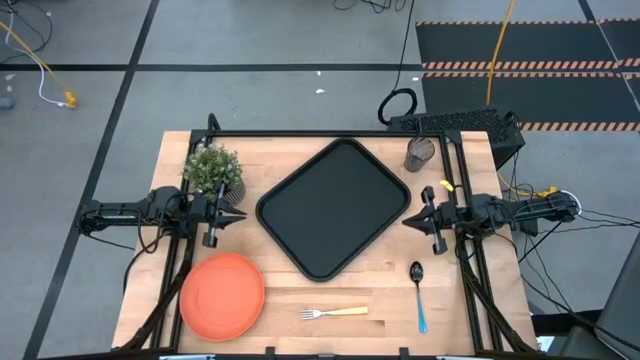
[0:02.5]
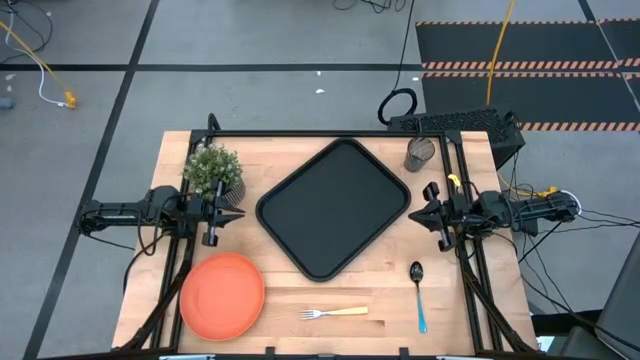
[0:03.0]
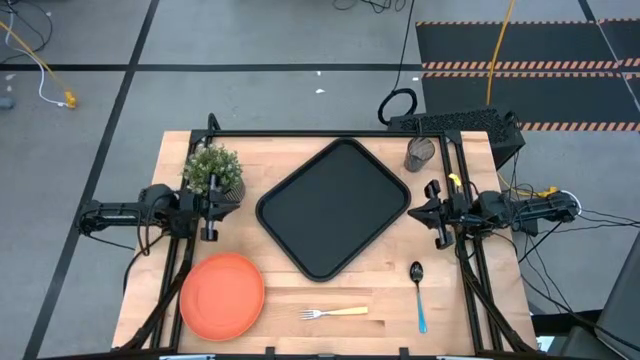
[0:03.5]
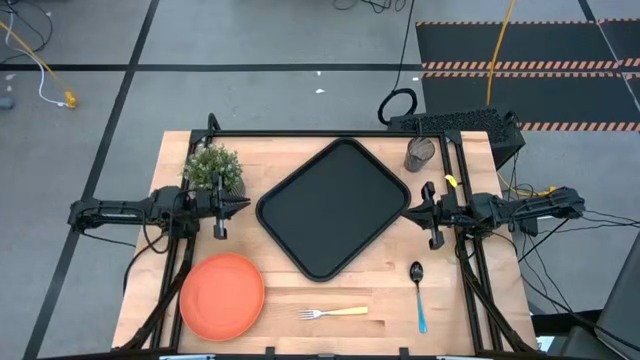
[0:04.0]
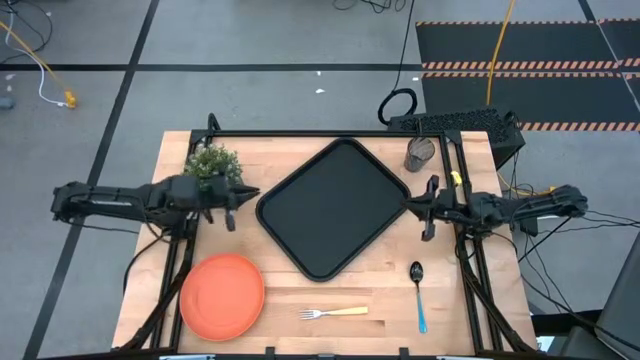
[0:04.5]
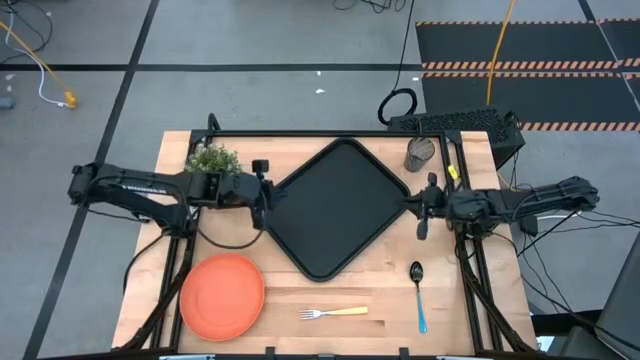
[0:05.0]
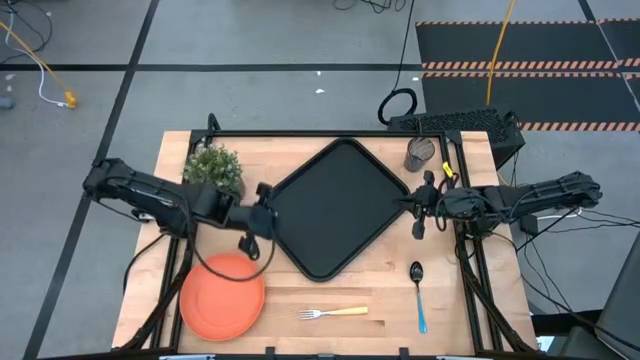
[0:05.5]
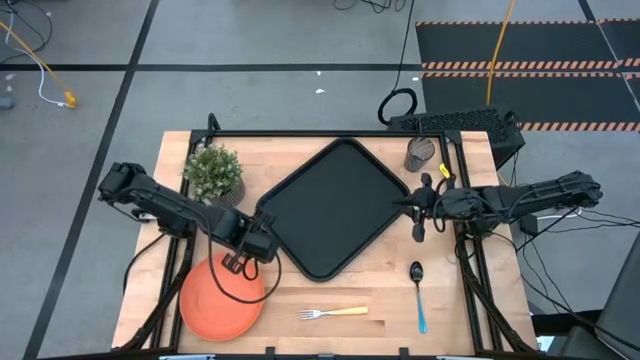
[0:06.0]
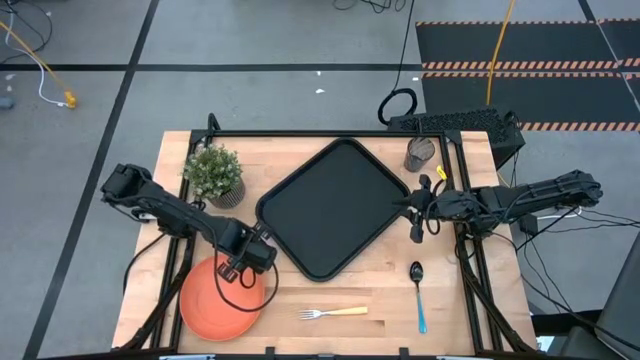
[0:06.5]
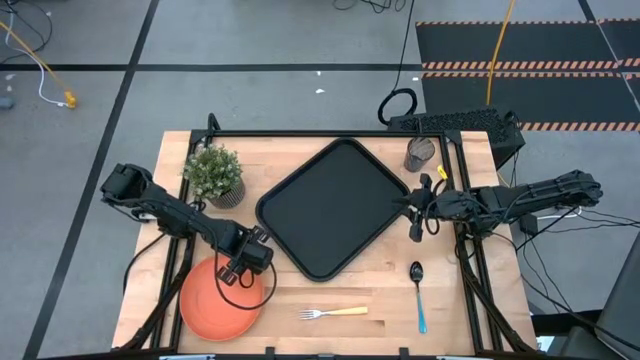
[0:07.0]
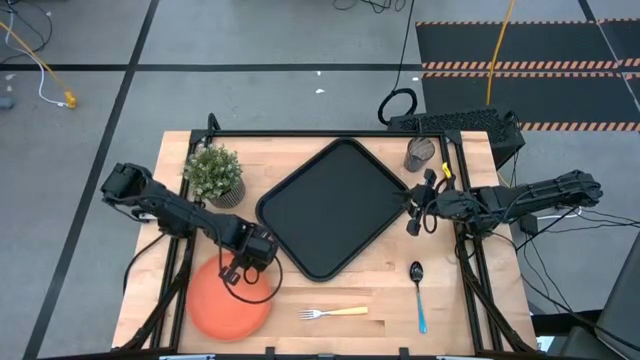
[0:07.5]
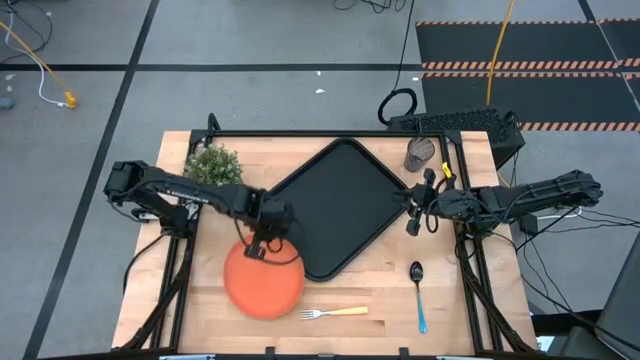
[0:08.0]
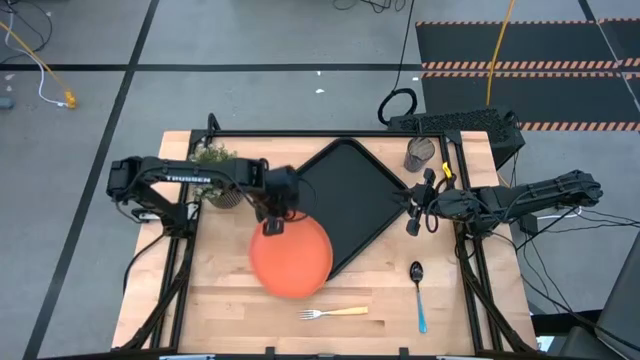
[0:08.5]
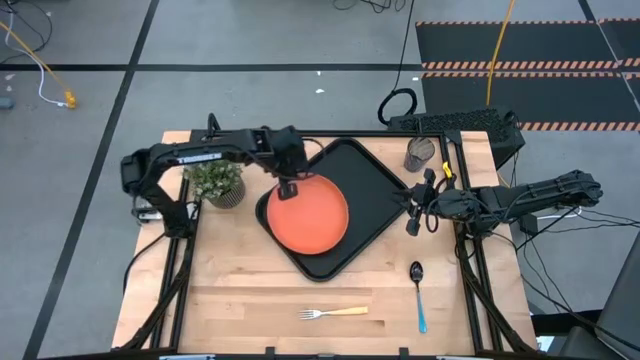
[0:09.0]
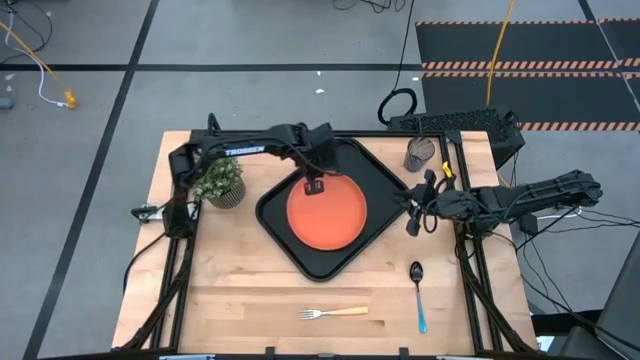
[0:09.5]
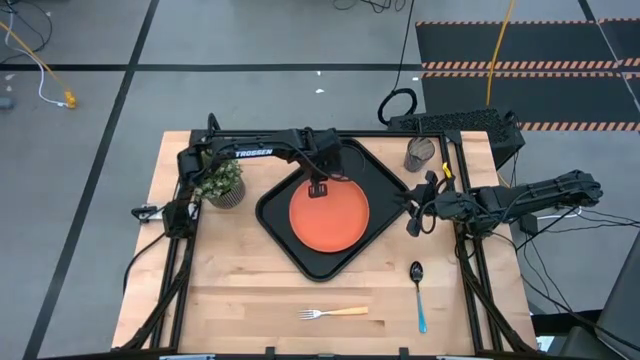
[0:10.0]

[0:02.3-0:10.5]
Task: Pick and place plate/cup/fork/spoon on tray
Put the orange plate on the black serving tray

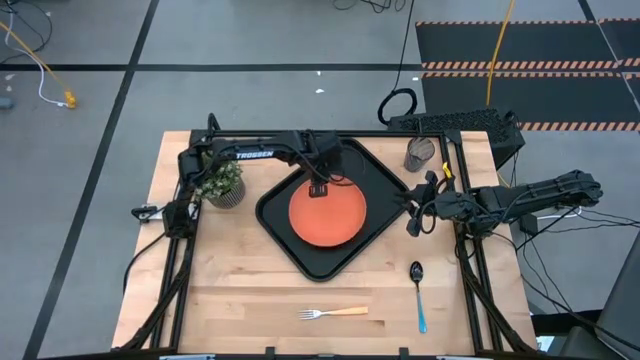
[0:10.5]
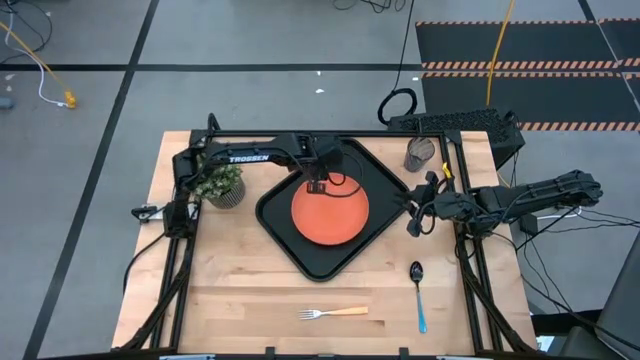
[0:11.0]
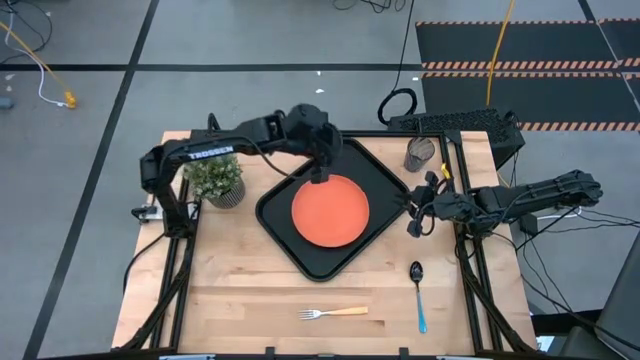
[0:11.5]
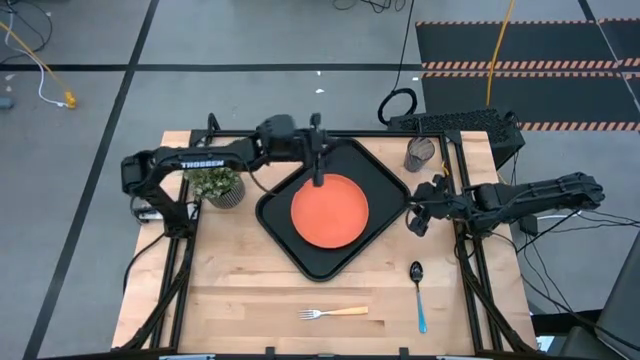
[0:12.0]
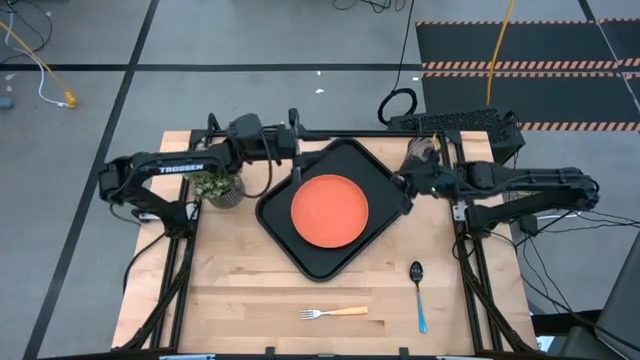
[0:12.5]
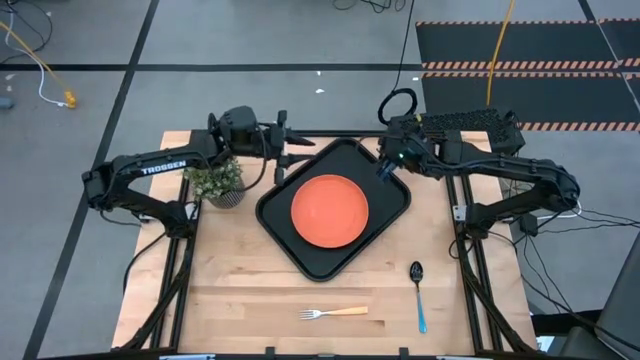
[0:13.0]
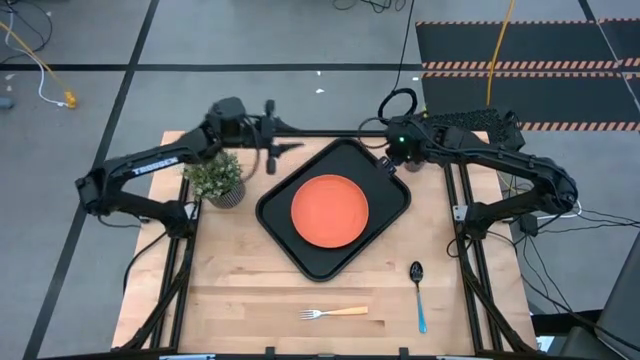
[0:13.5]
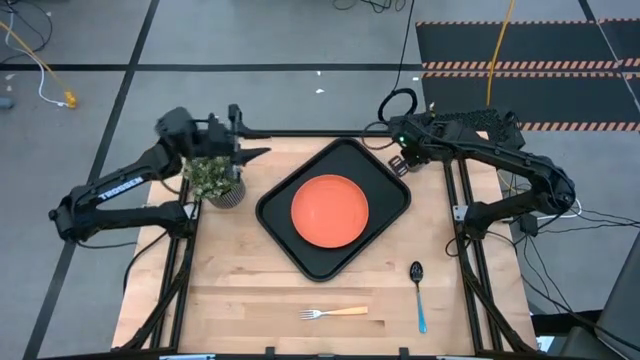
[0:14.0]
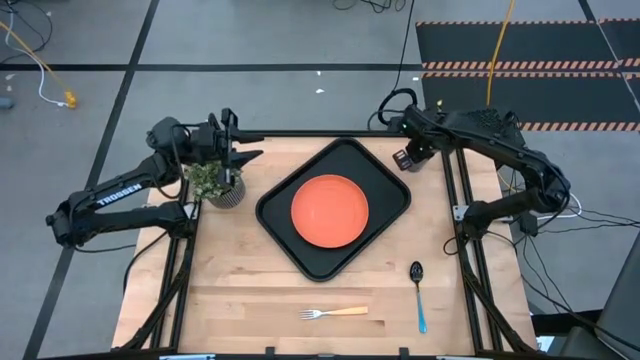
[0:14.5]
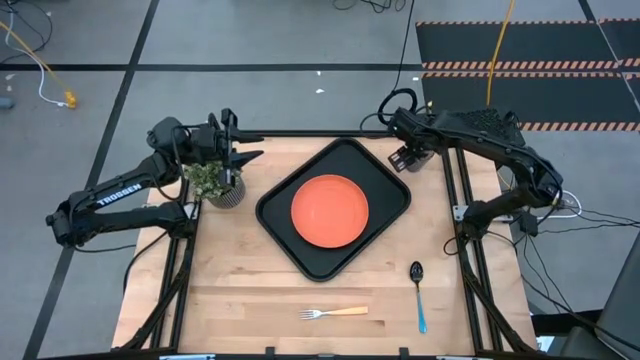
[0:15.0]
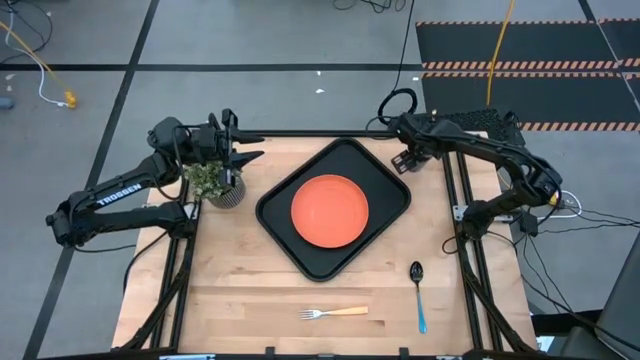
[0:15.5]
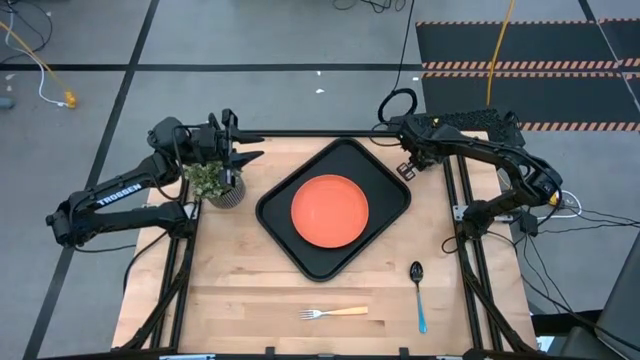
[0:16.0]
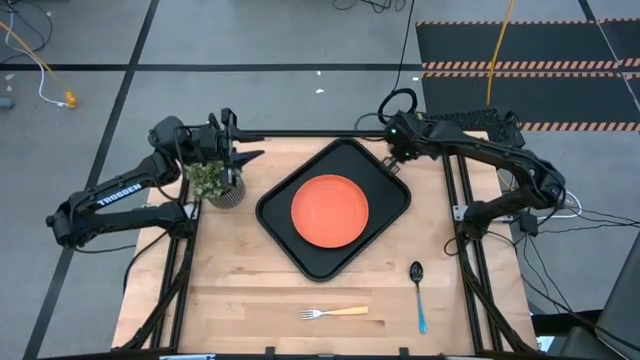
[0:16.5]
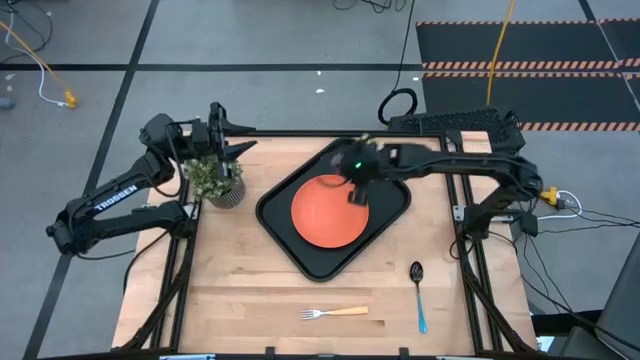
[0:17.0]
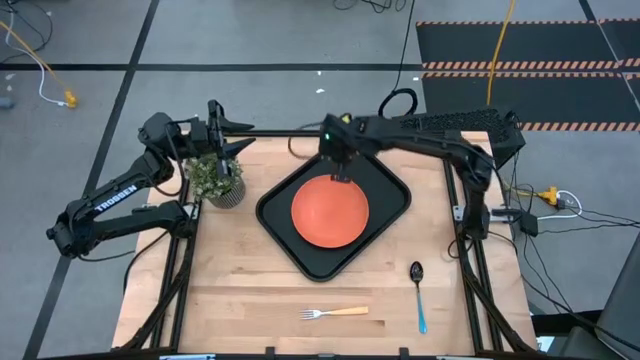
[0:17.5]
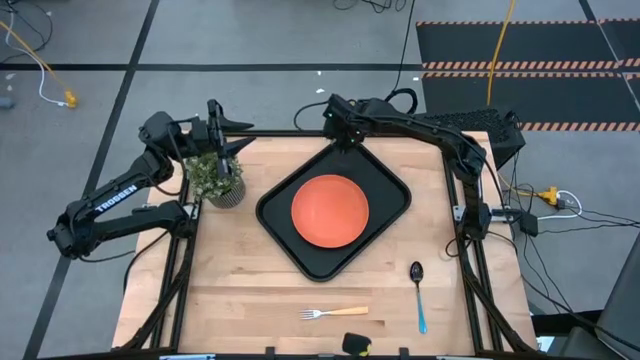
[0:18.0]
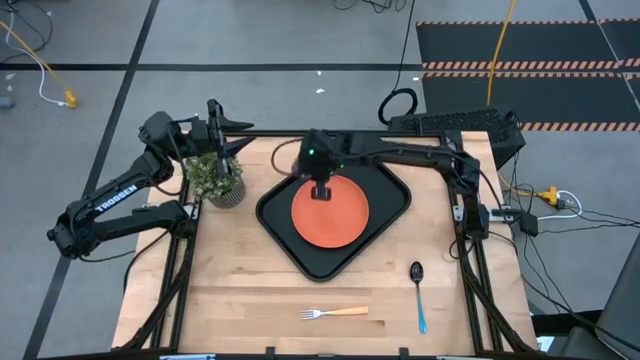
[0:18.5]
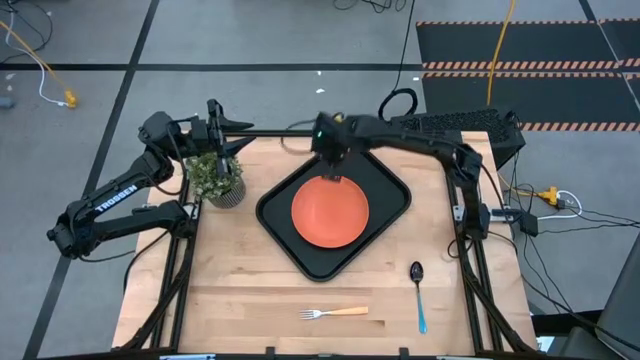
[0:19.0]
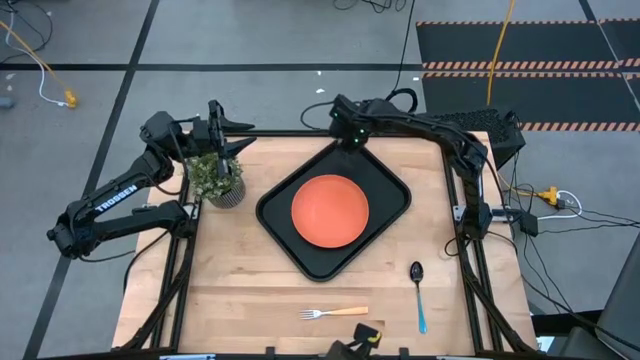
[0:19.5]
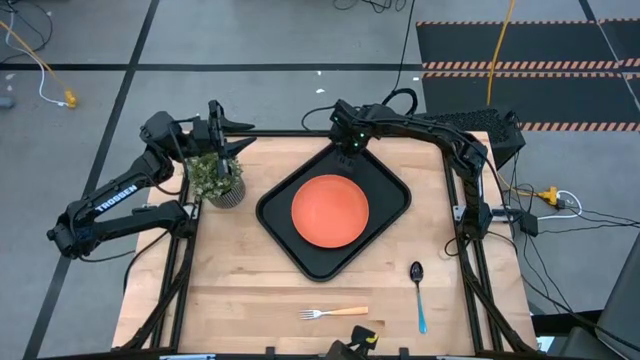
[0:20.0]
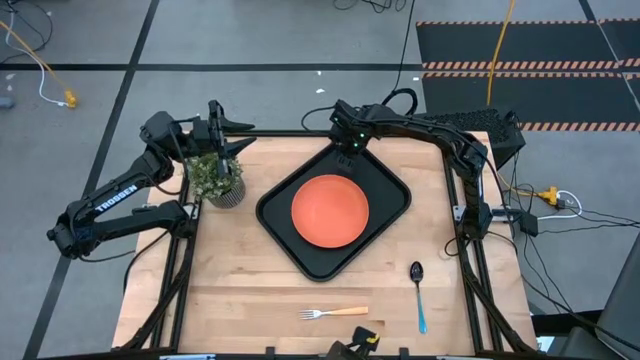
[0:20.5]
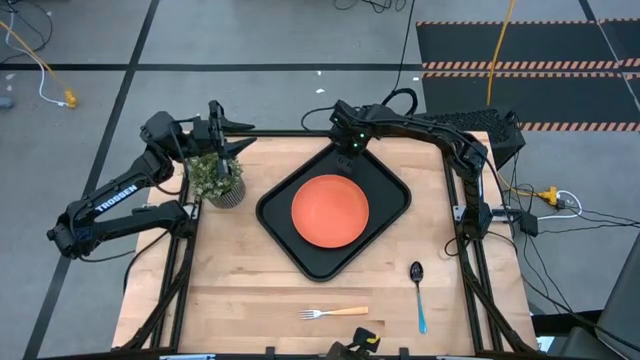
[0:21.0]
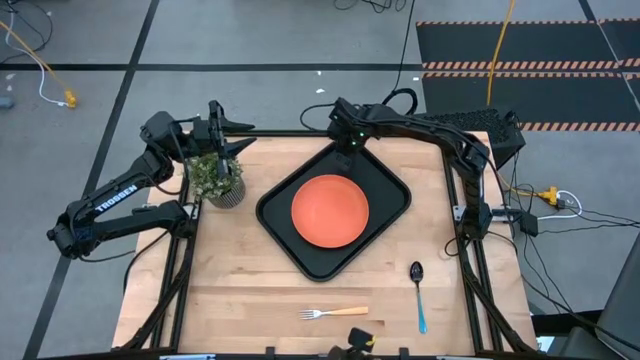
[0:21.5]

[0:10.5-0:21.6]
Put the blue cup on the black serving tray

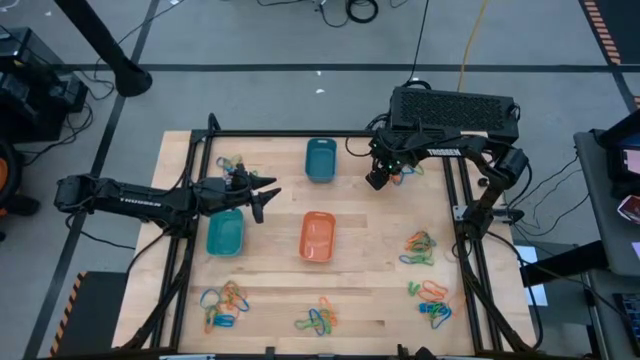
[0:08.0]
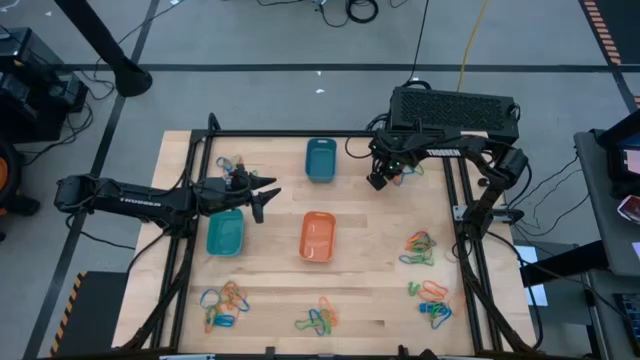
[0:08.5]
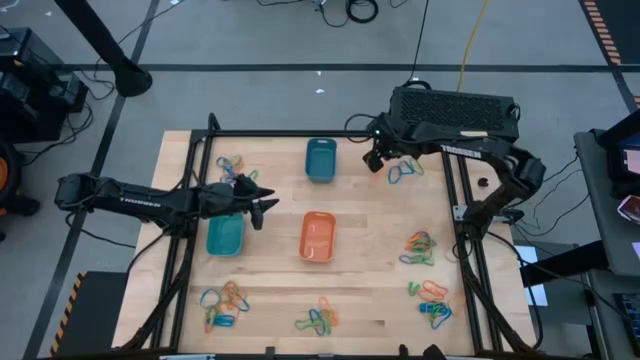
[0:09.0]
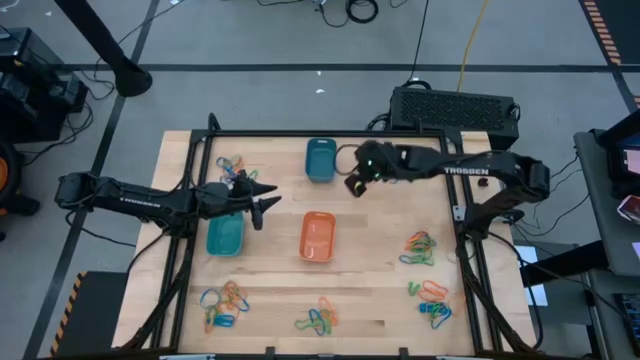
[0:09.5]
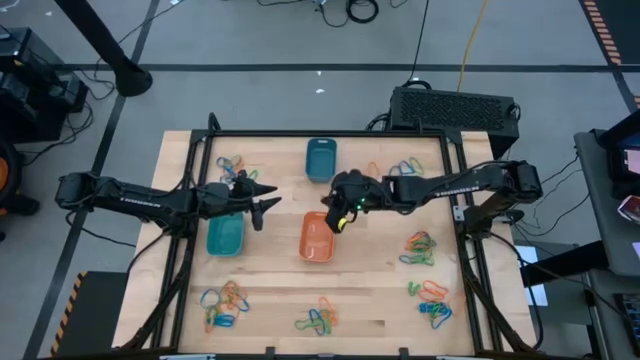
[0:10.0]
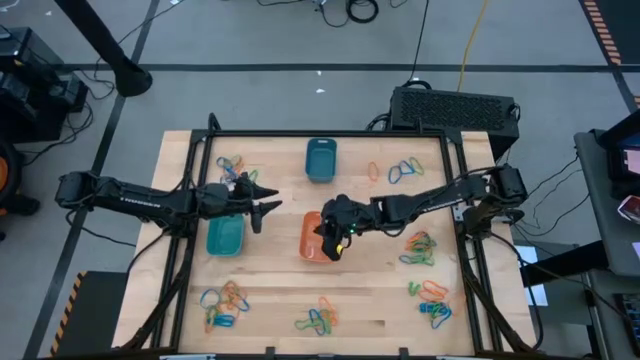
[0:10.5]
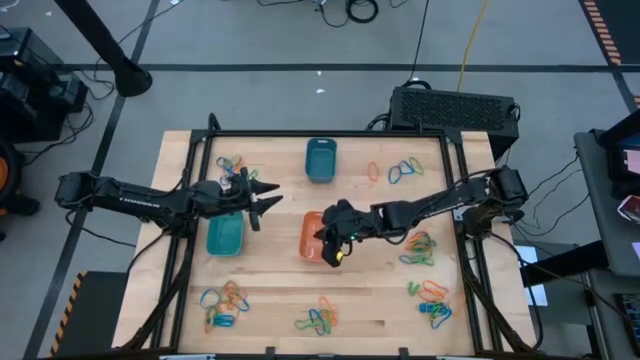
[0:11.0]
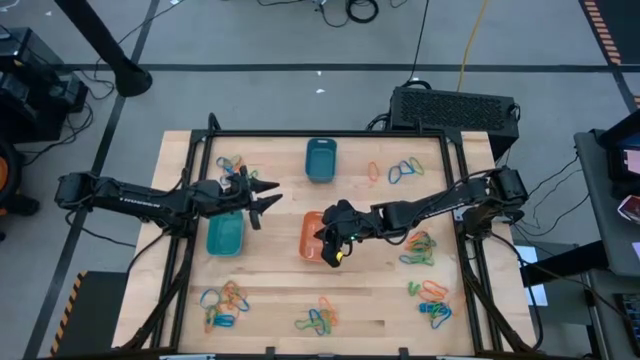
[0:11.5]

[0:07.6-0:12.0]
Task: Sort rubber bands into baskets
Put the orange rubber band into the orange bin
